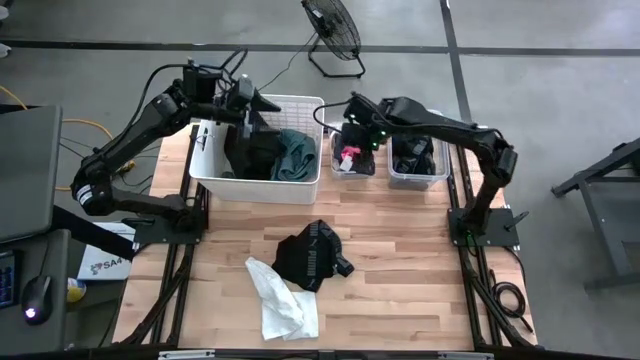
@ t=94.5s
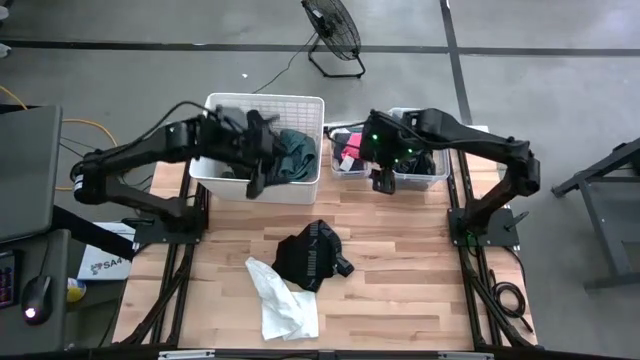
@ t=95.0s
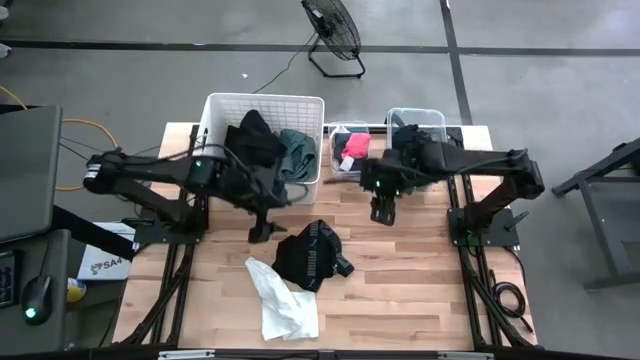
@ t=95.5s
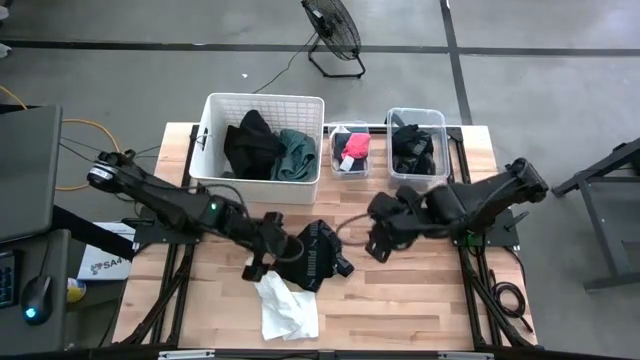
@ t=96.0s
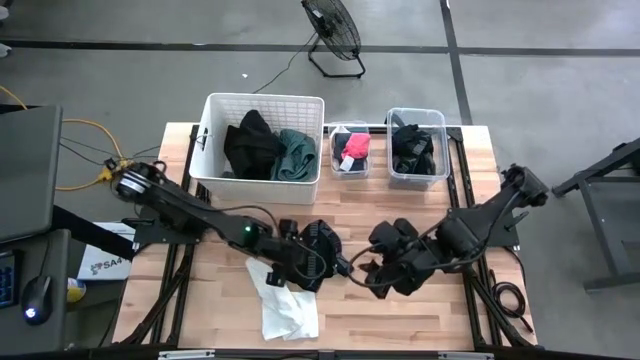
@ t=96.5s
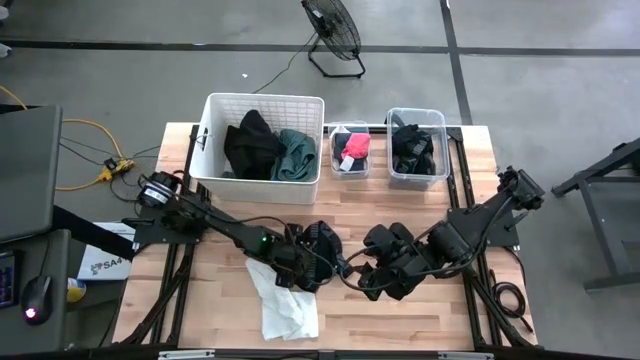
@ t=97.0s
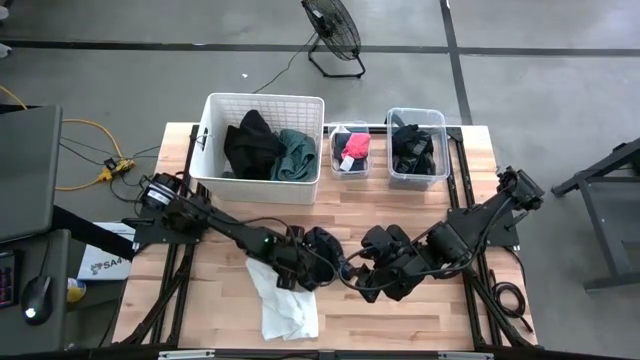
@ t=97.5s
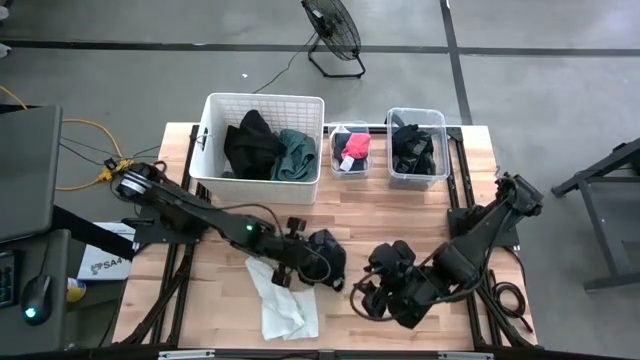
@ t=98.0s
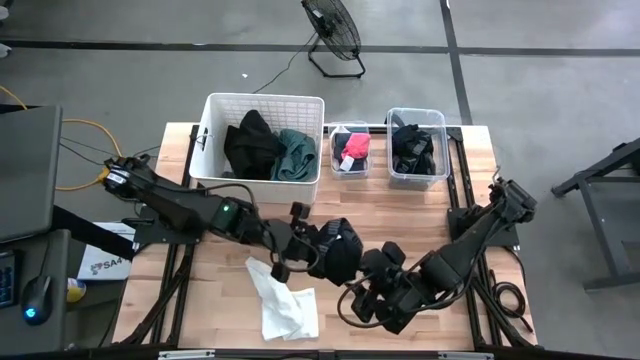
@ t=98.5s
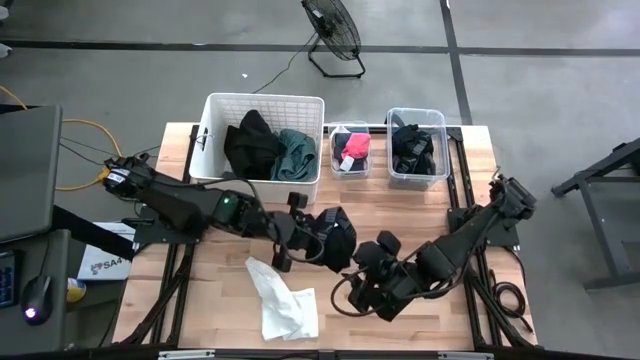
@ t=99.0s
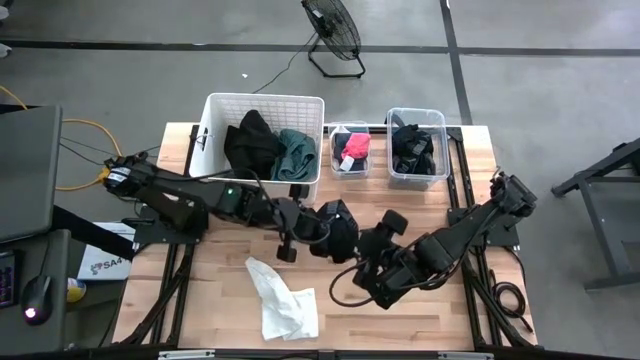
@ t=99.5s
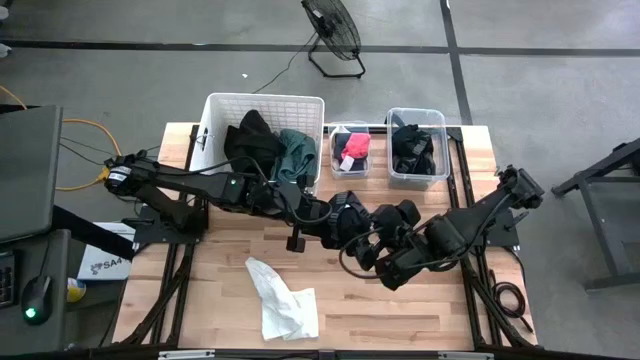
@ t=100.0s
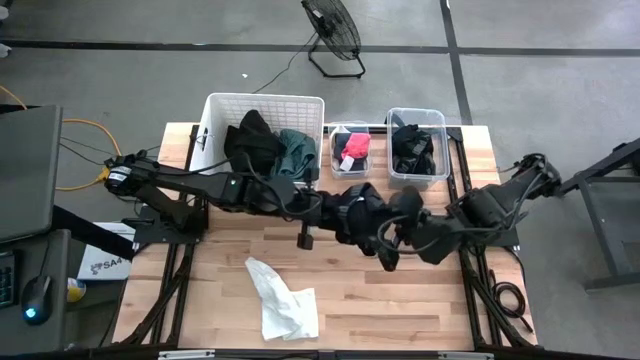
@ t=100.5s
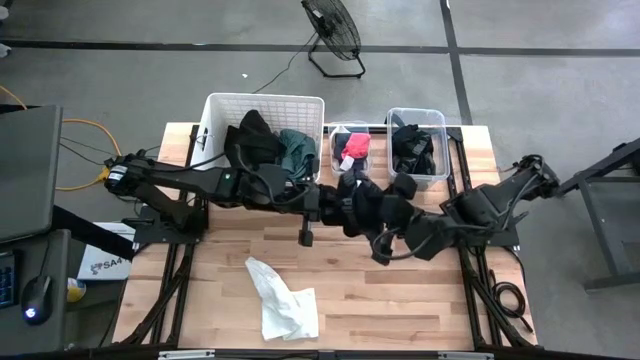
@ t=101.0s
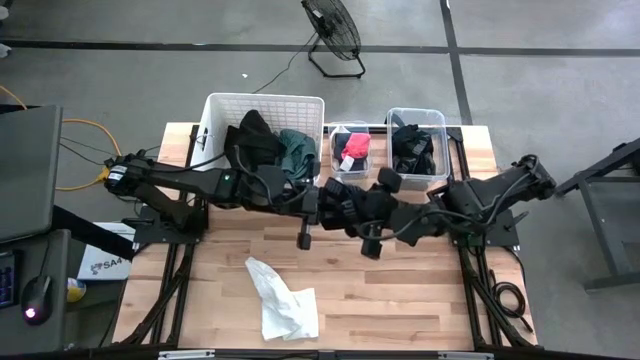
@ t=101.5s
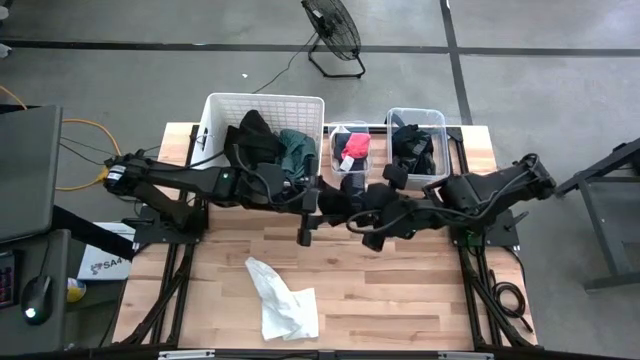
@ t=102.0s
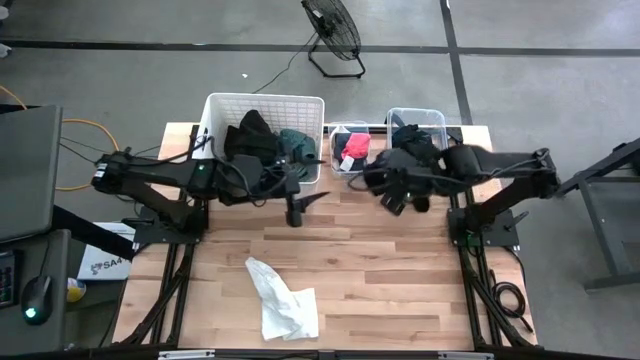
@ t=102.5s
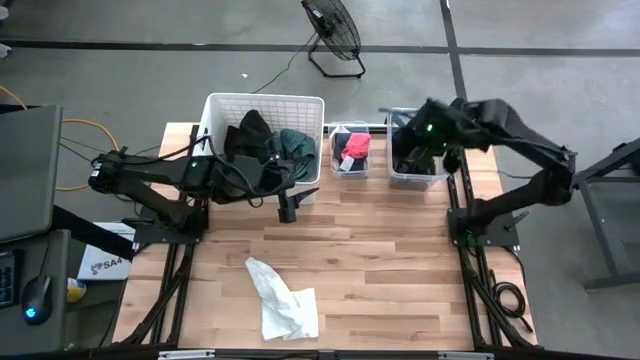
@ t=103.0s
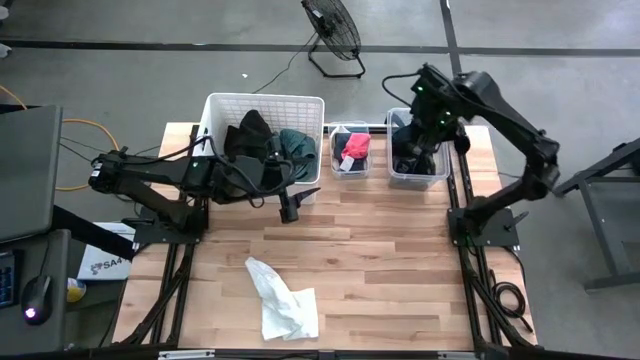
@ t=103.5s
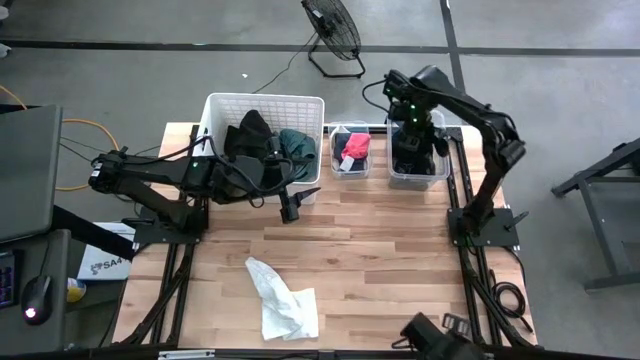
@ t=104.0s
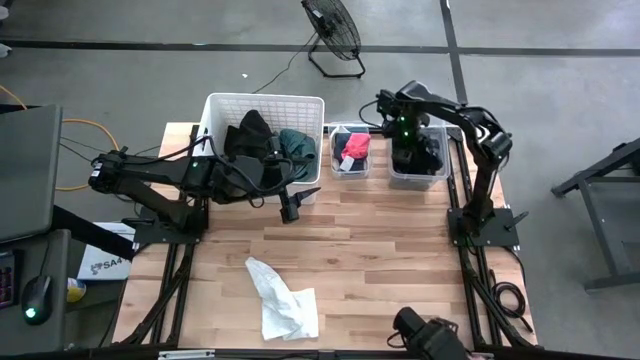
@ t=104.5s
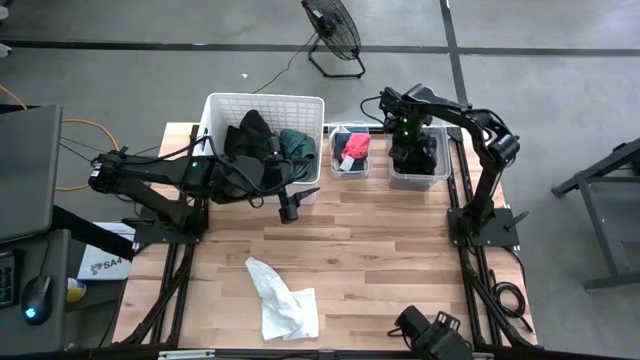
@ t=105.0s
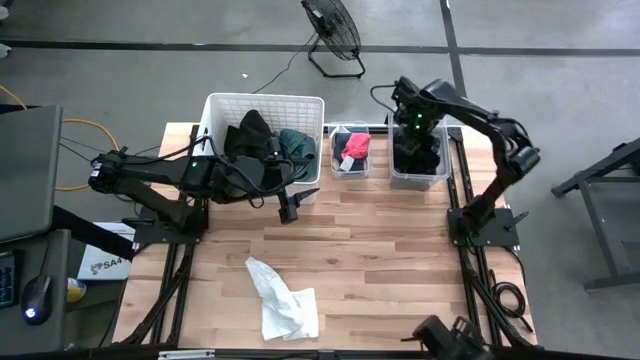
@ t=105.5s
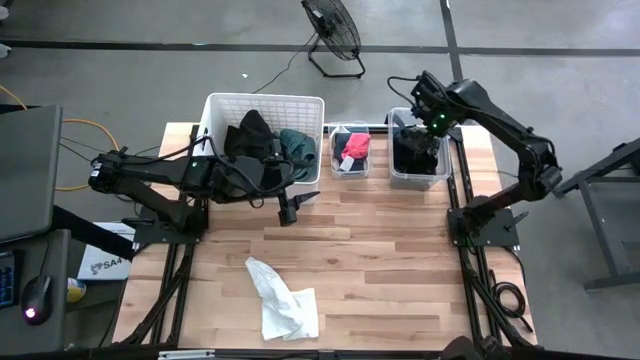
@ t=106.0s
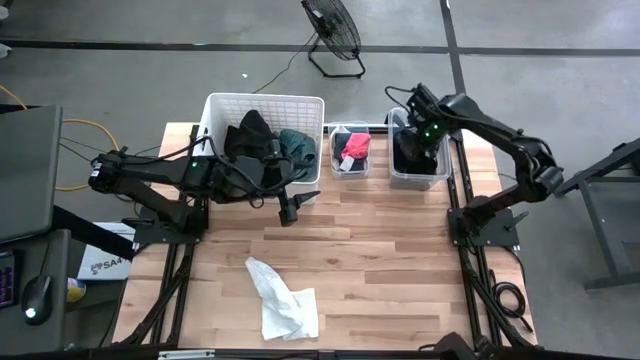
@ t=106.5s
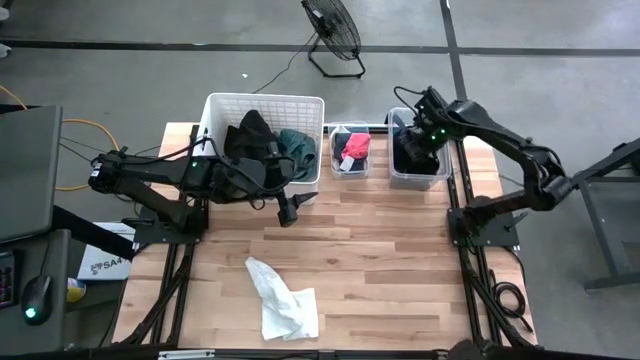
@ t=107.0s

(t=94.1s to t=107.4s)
Task: Pick & Place Cloths
Put the black boxer short into the right transparent bin

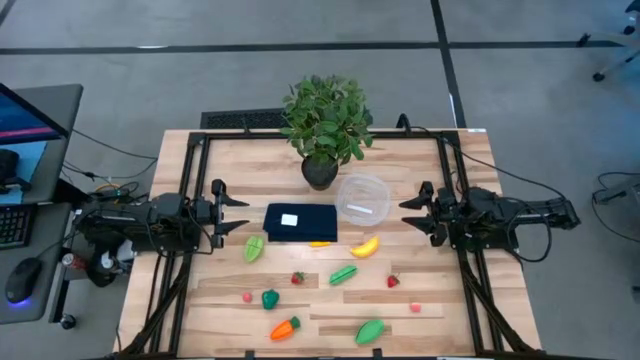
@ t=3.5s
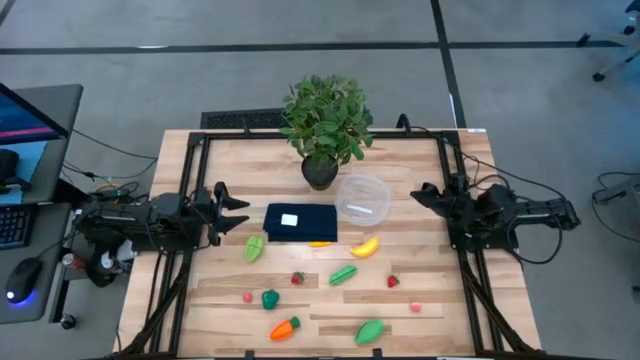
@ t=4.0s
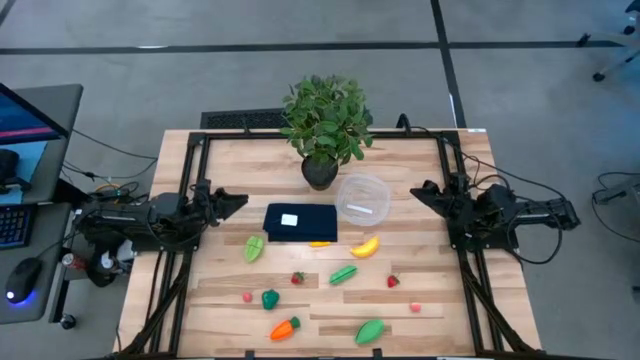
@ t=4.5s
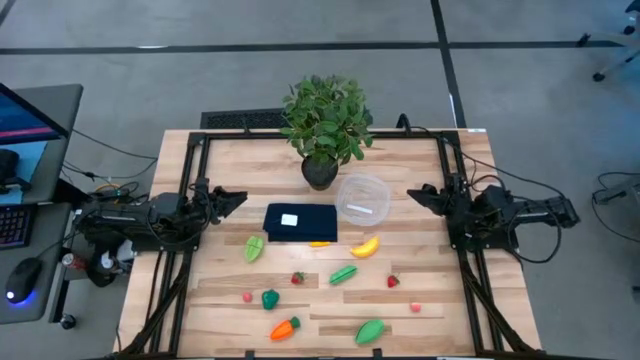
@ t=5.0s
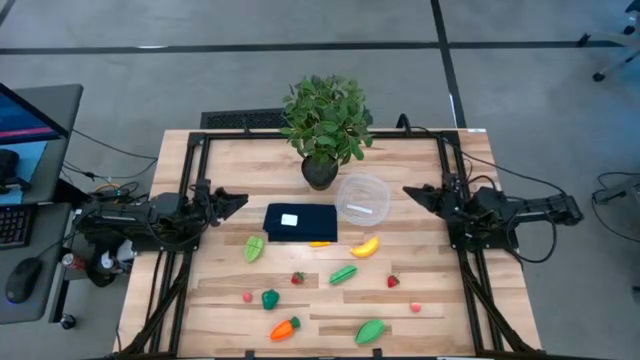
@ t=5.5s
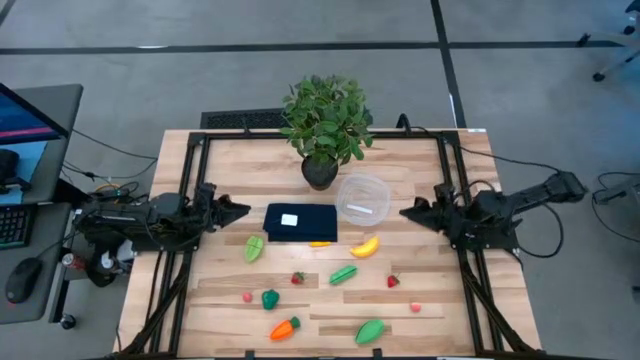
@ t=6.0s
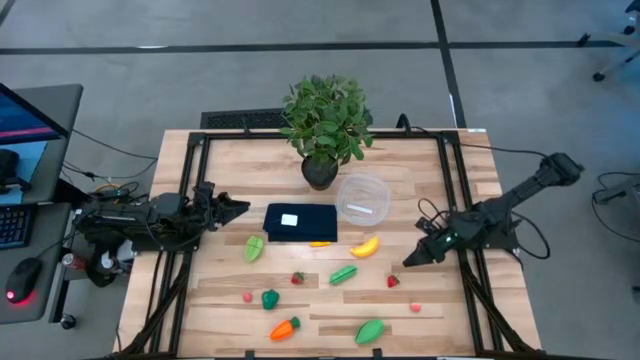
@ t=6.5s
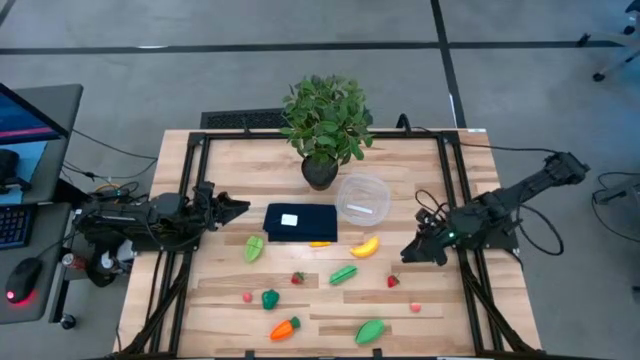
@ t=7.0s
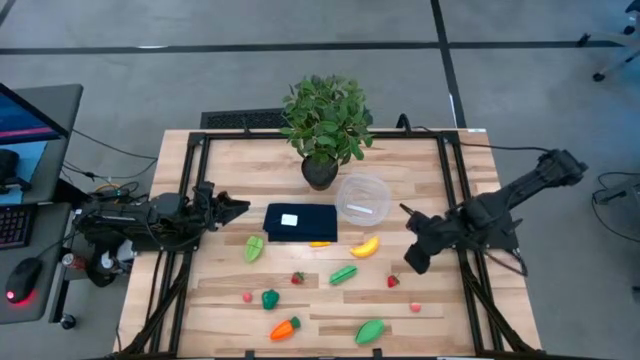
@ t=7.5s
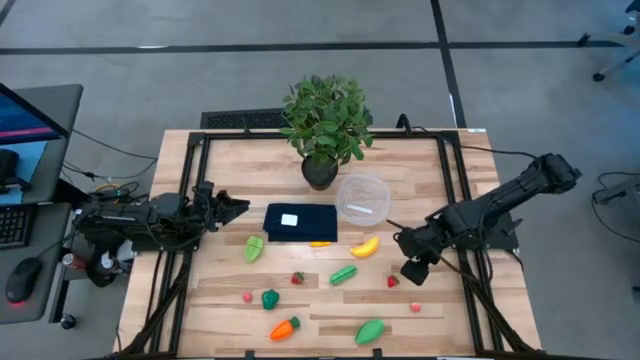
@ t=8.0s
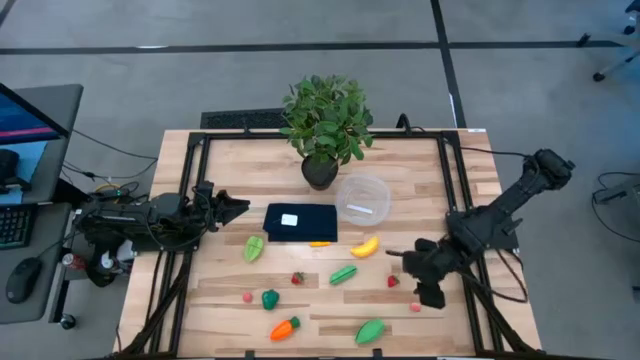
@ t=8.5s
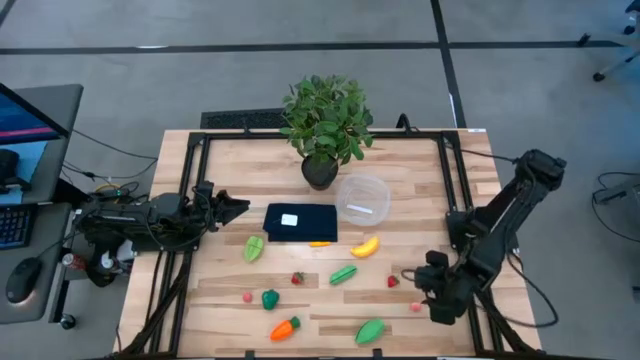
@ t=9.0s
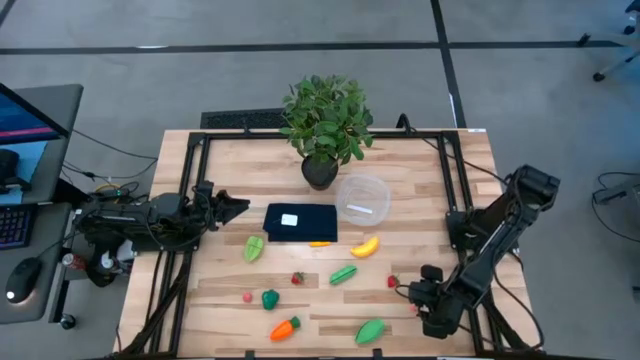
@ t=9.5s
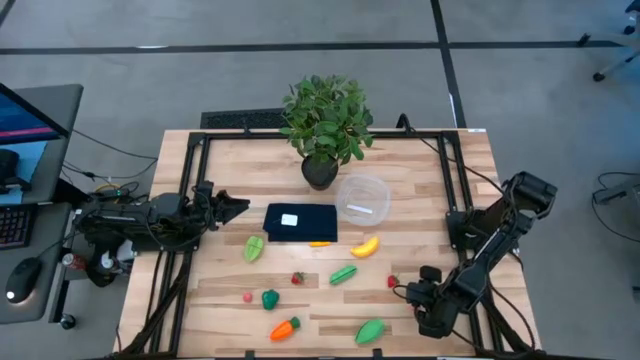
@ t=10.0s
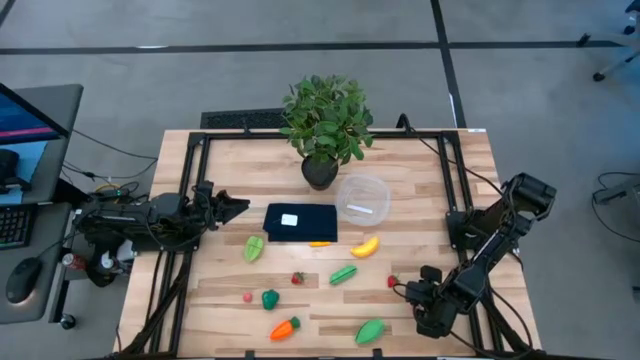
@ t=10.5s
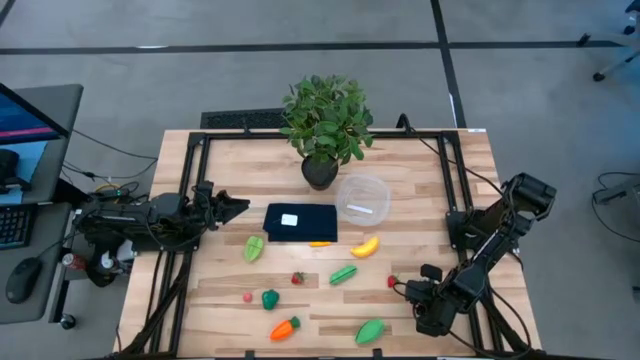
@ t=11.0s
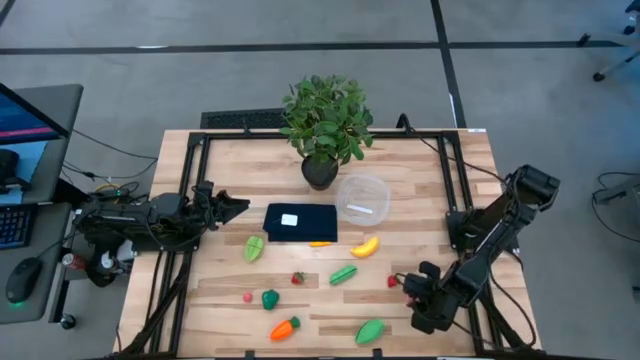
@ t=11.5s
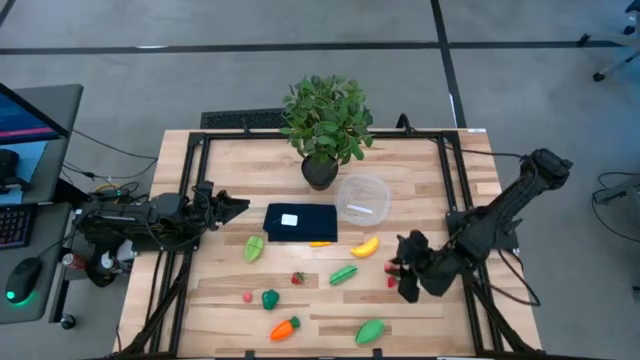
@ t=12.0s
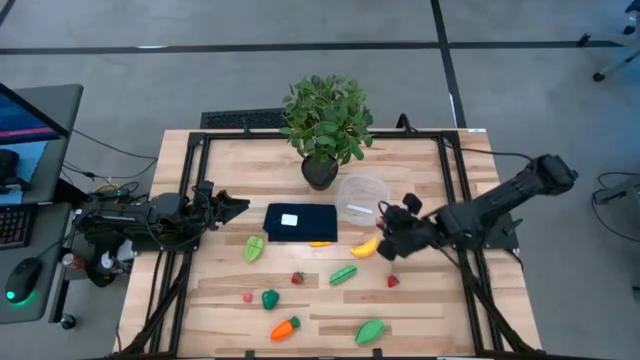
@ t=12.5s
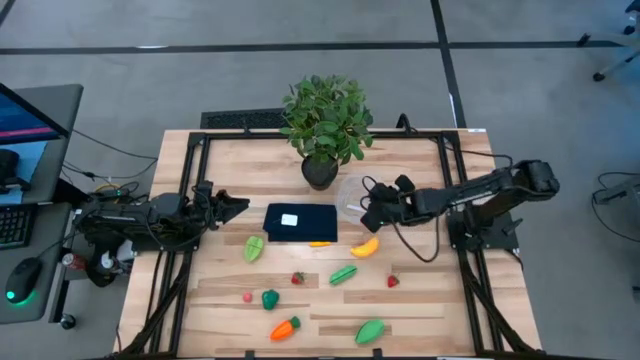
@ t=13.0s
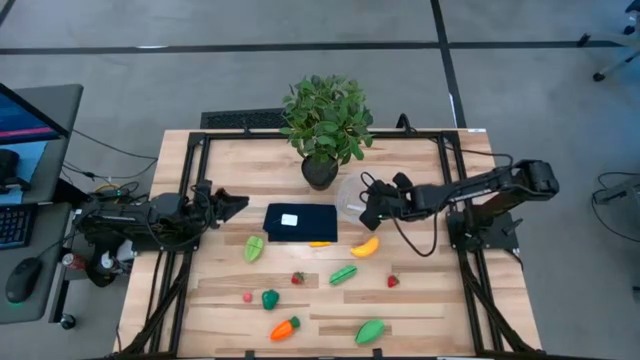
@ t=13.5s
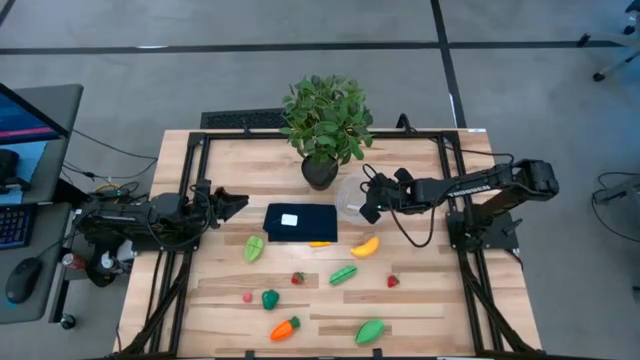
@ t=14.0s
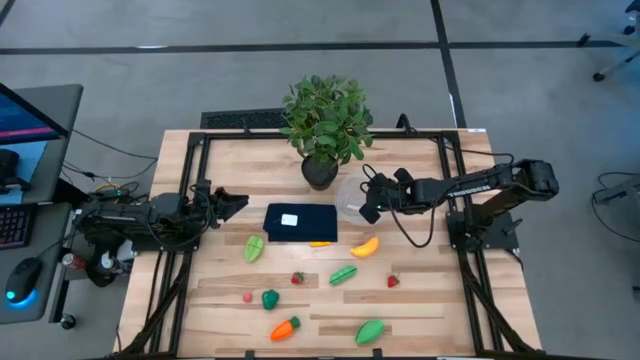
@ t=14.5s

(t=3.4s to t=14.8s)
Task: Pick and placing Produce into tupperware
Put the pink peach into the transparent container
